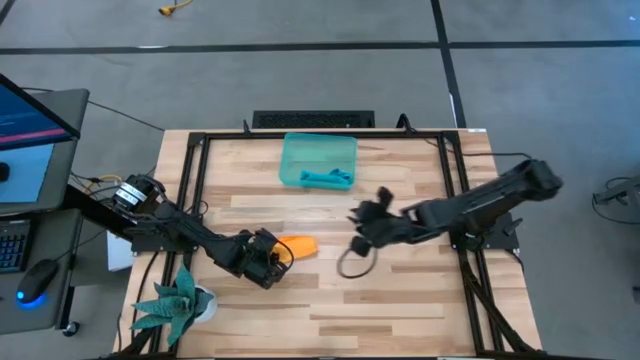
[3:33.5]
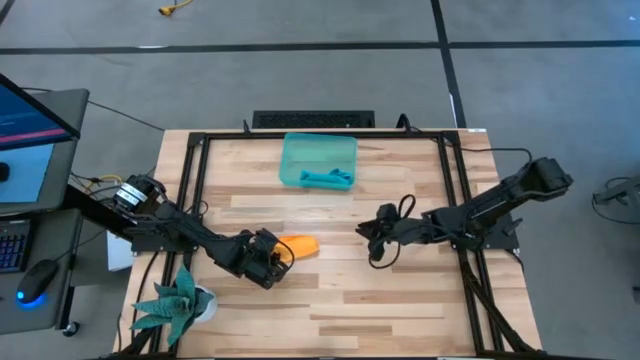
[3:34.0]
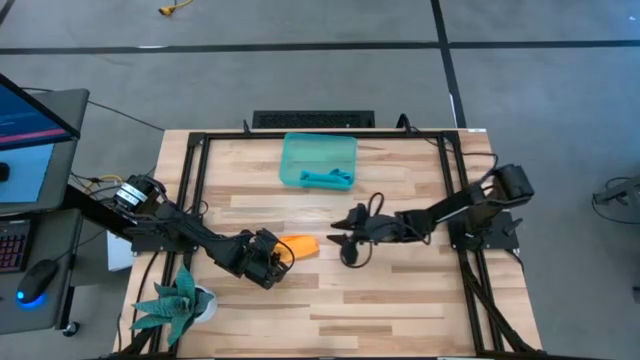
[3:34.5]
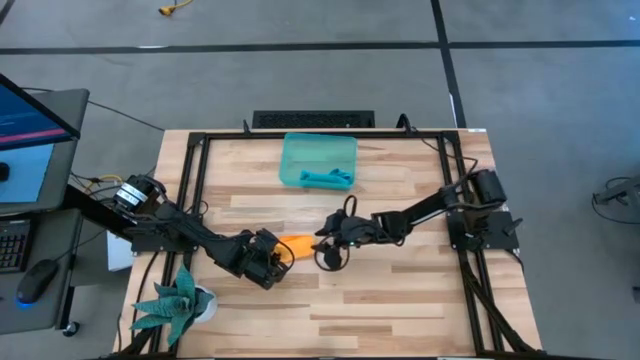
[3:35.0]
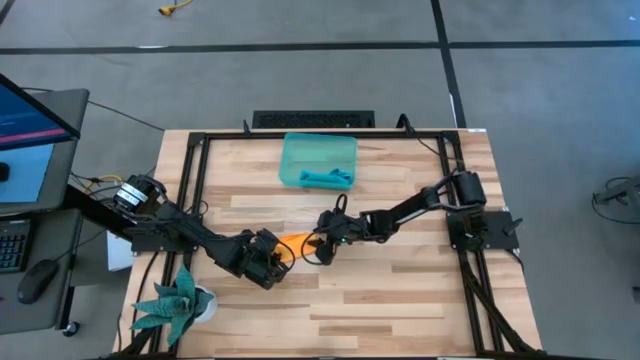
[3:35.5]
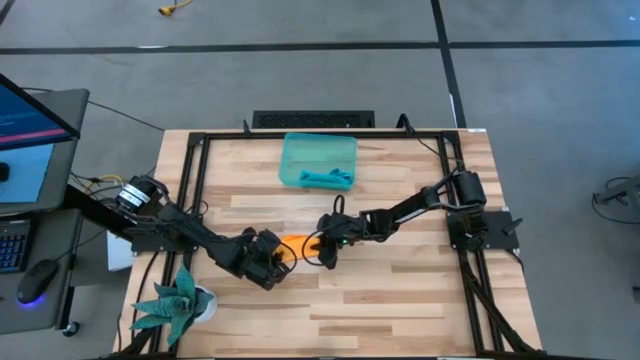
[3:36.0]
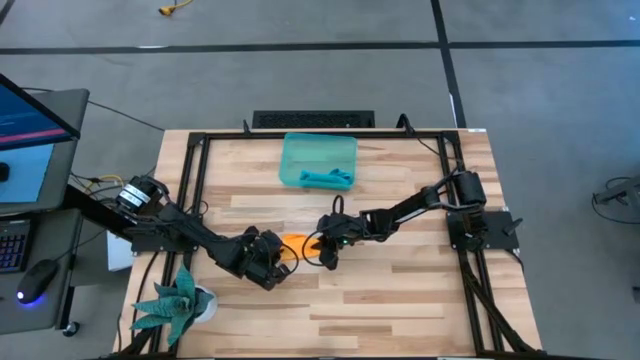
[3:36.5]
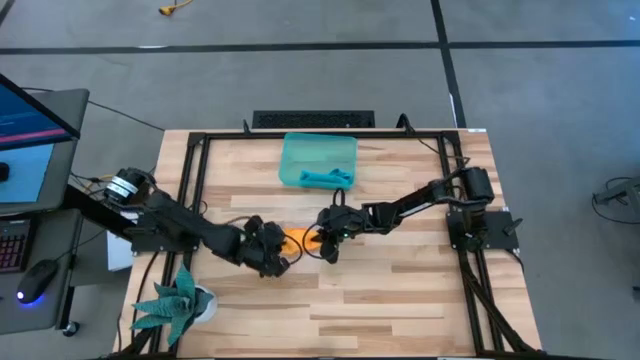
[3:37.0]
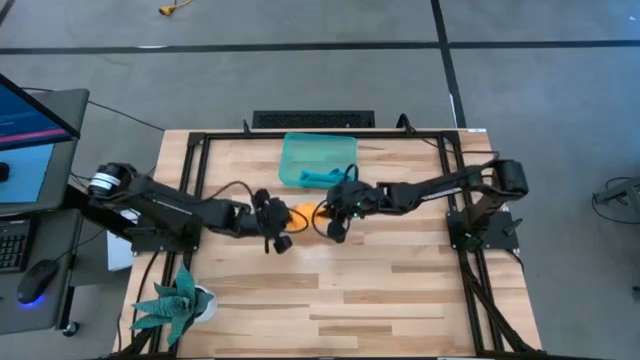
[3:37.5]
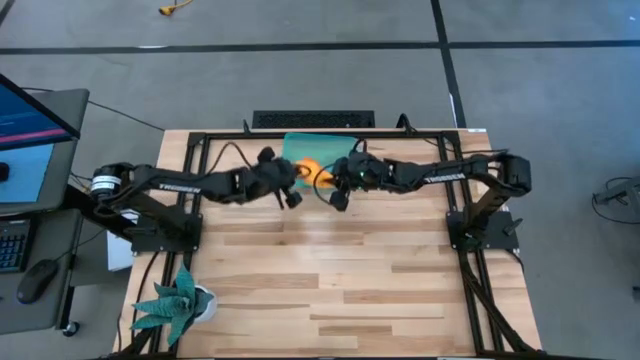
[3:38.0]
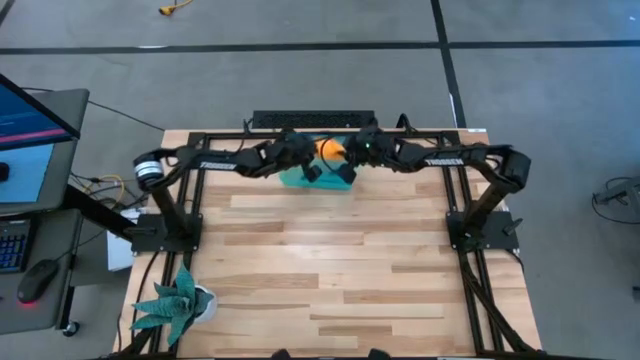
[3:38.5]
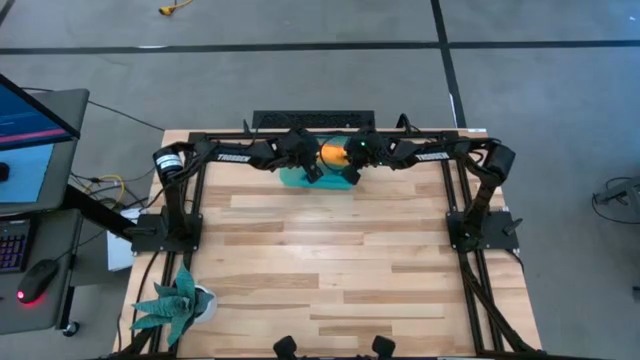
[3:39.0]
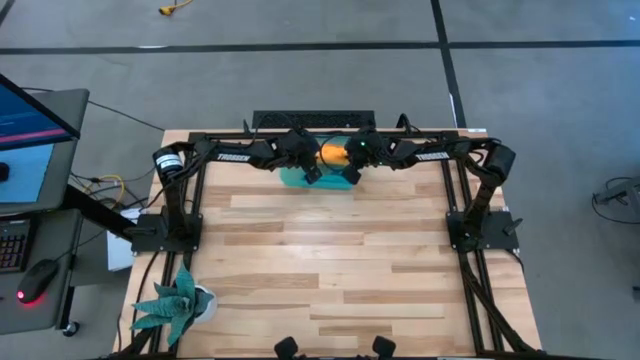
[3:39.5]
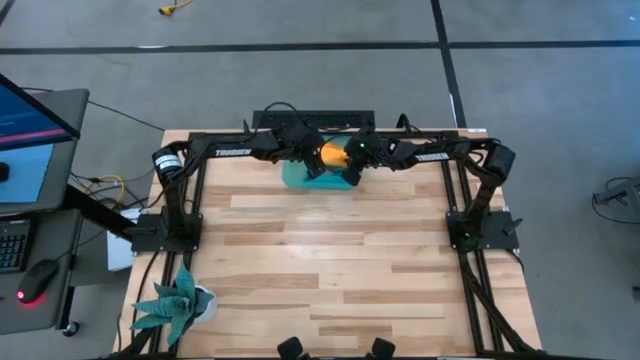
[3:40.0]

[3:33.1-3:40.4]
Task: Roll microfiber towels into tight, uniform cylinder then place into a basket
Put the yellow microfiber cloth into the blue bin

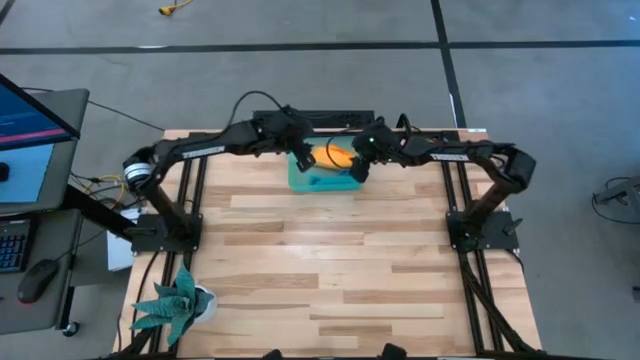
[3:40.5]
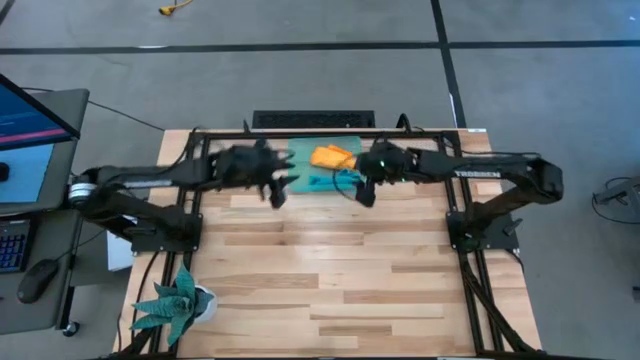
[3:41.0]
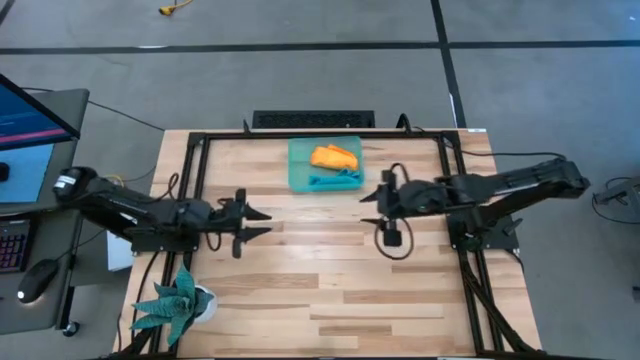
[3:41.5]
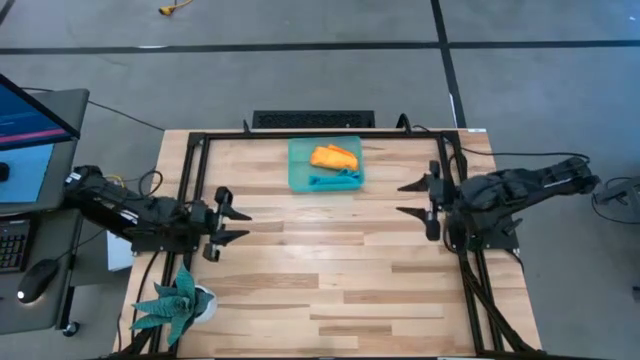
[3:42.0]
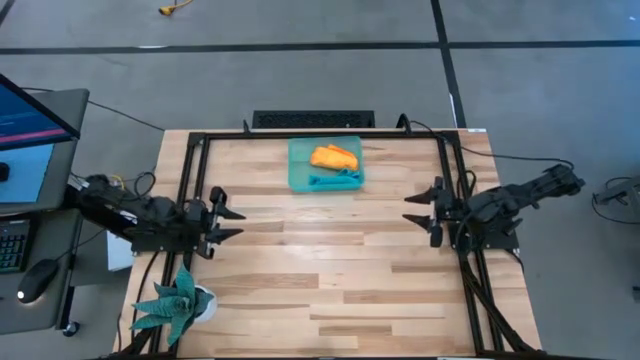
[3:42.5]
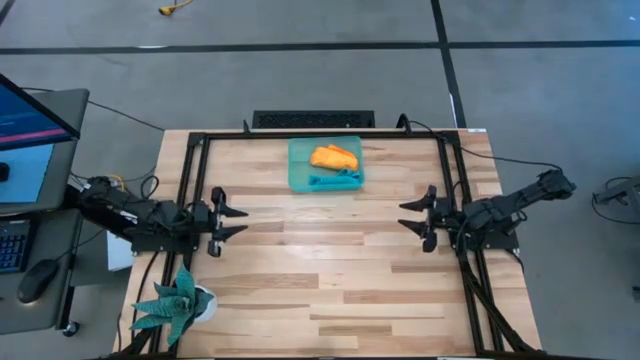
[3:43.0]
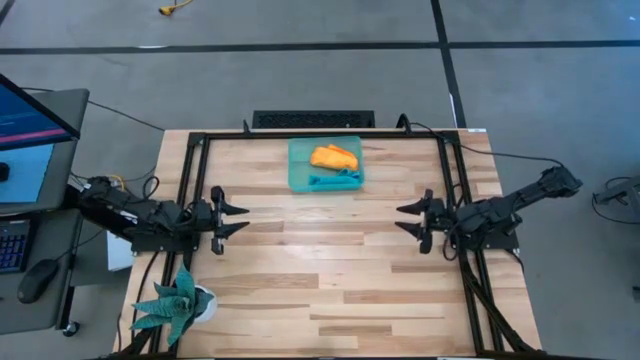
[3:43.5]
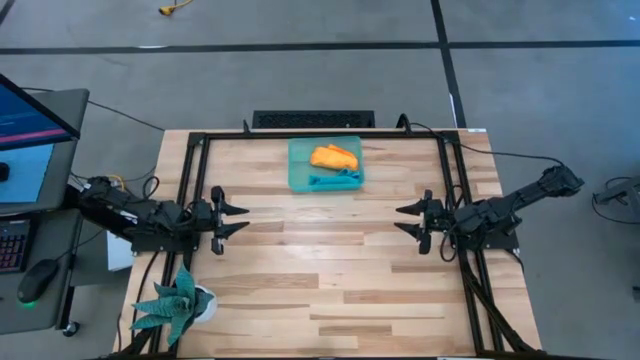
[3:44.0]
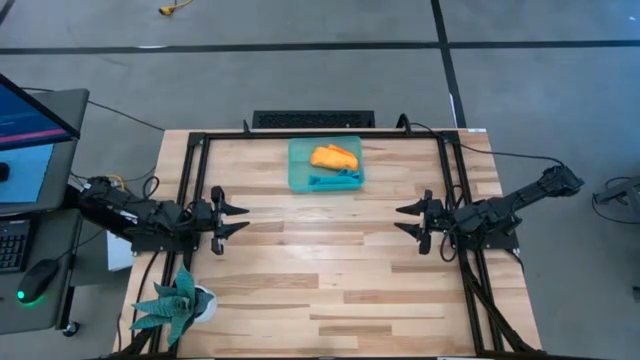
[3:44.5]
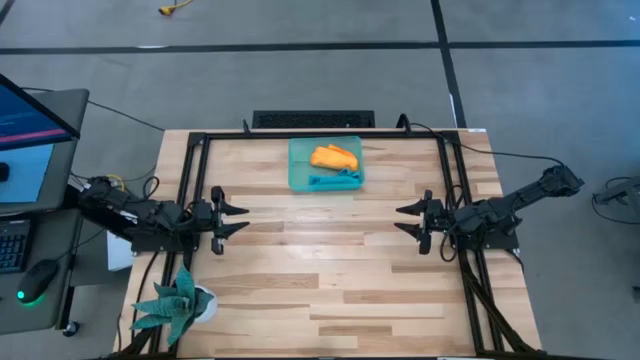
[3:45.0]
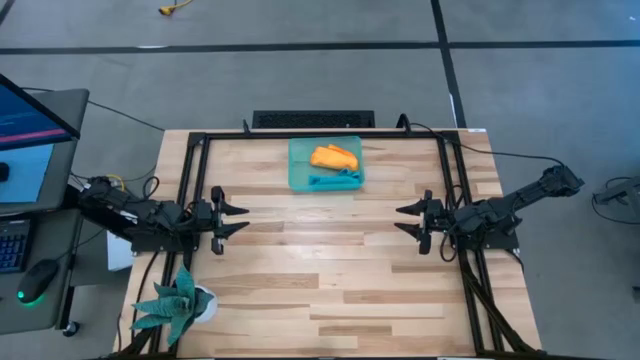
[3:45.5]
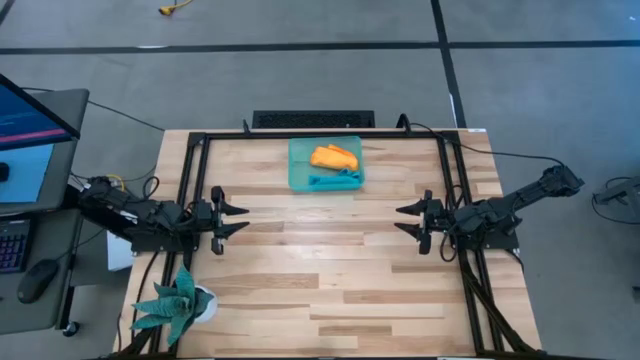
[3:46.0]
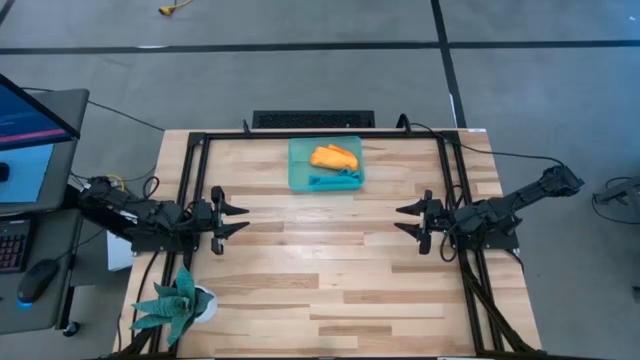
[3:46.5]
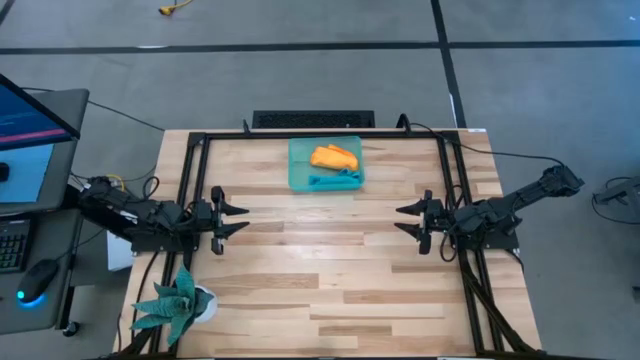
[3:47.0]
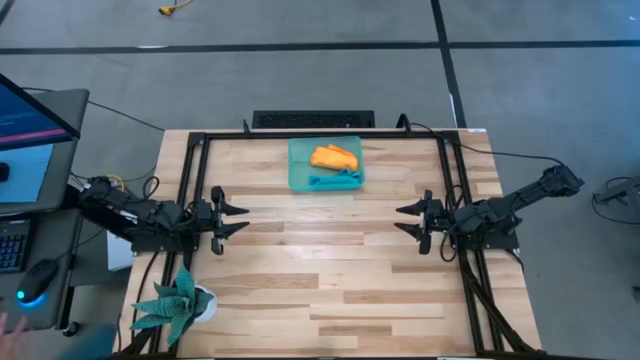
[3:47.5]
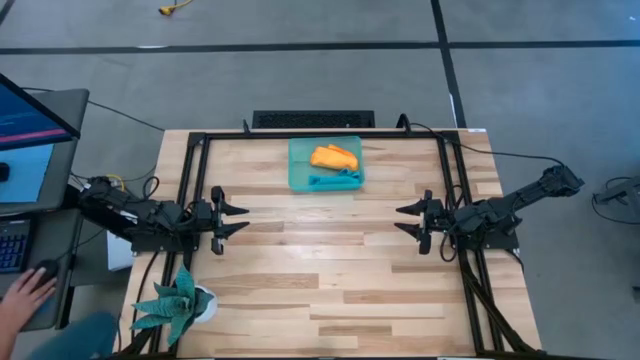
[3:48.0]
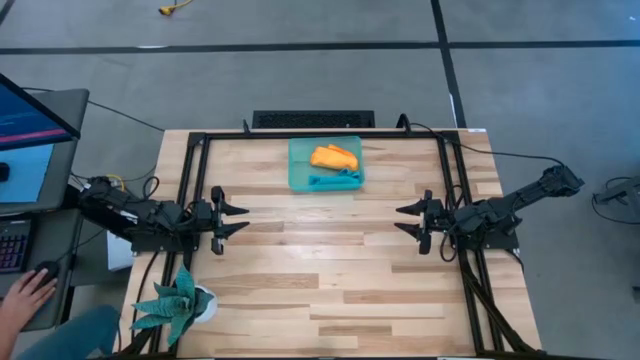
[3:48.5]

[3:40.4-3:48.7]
Return to Home Position

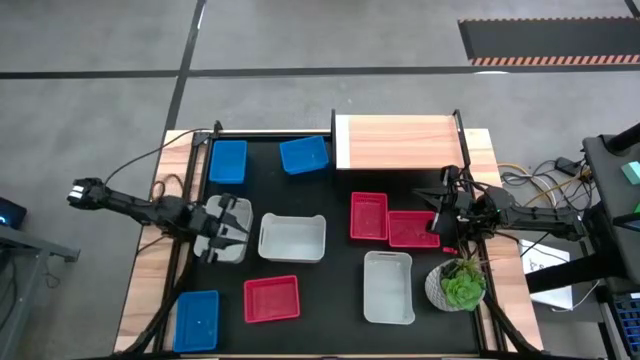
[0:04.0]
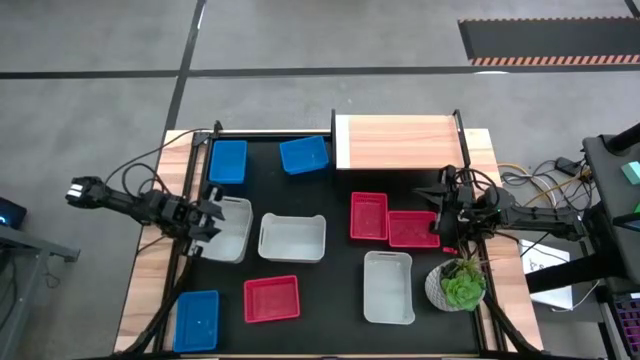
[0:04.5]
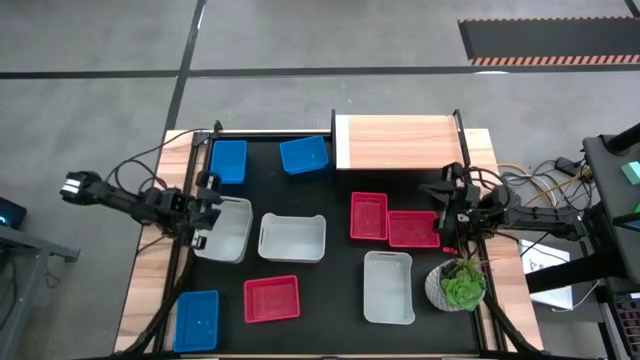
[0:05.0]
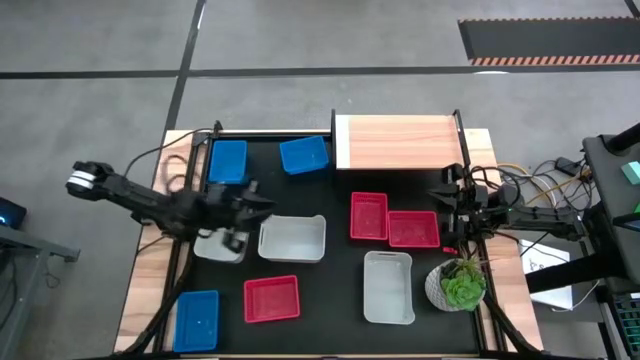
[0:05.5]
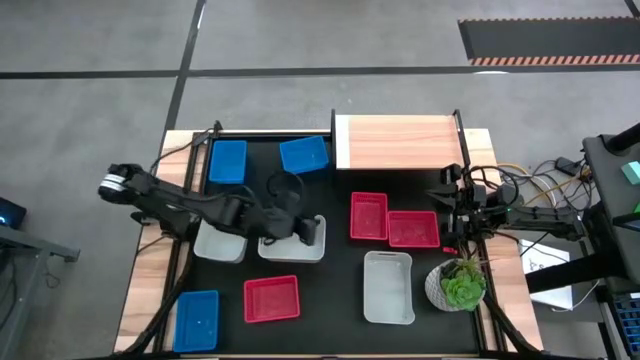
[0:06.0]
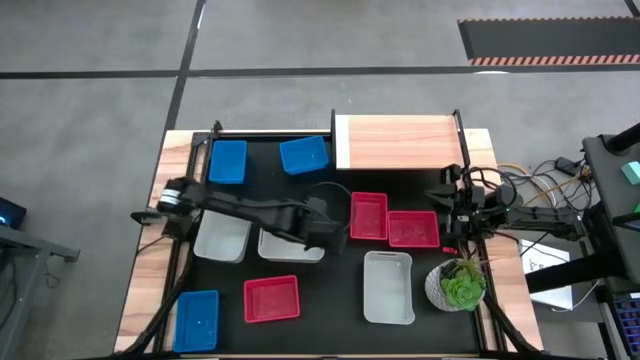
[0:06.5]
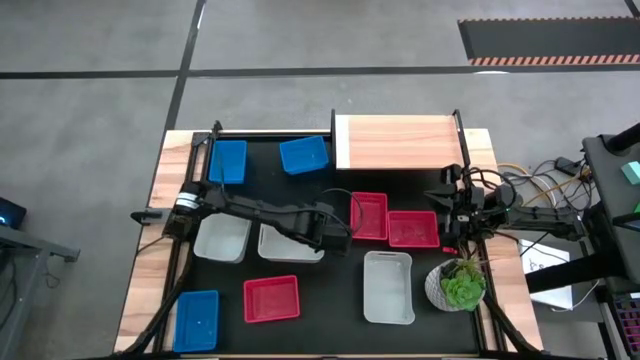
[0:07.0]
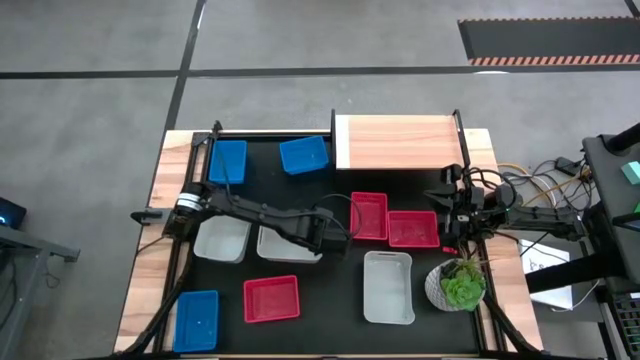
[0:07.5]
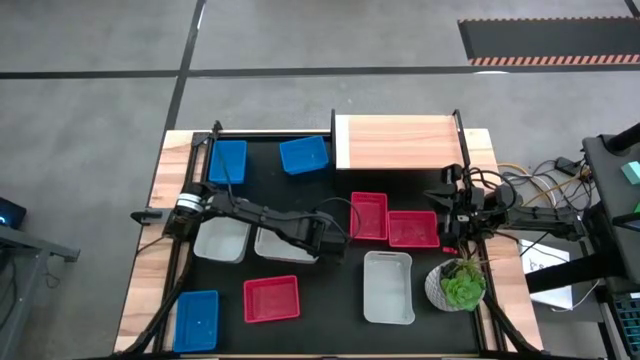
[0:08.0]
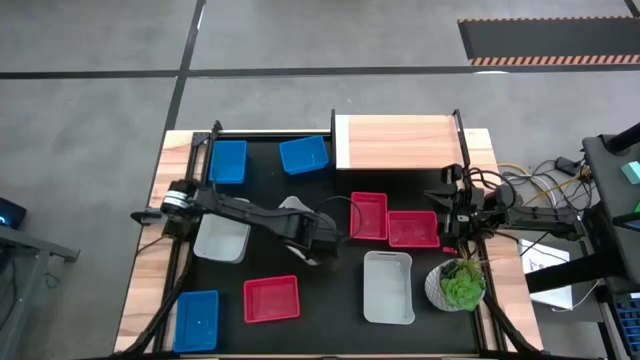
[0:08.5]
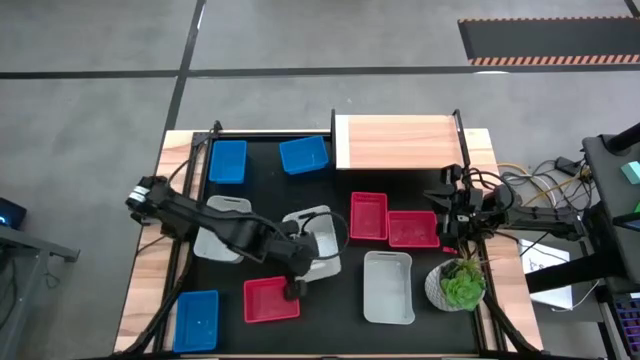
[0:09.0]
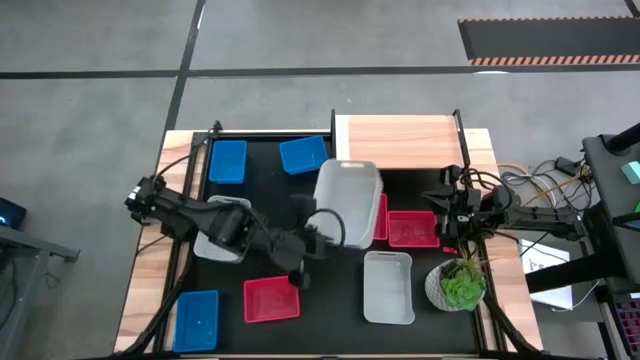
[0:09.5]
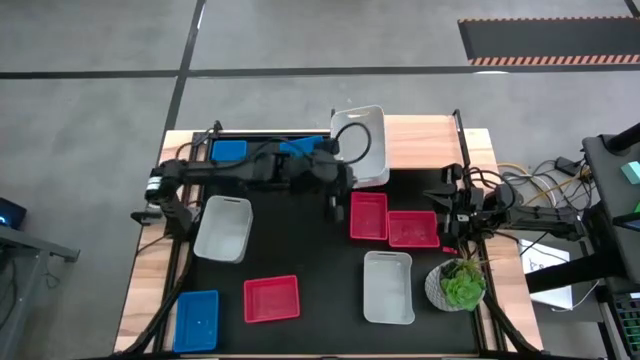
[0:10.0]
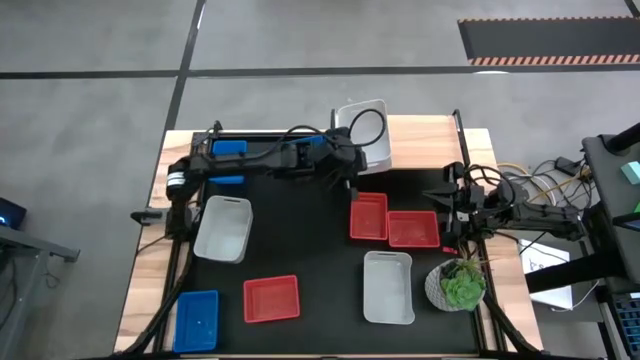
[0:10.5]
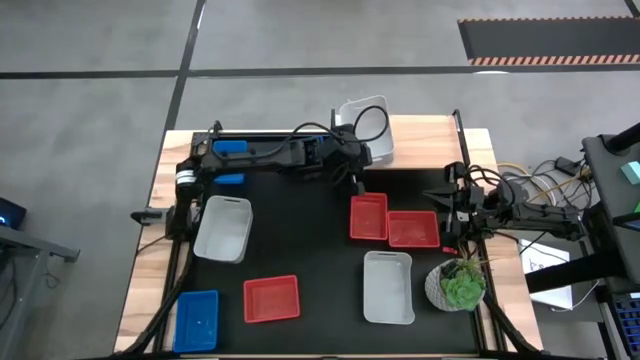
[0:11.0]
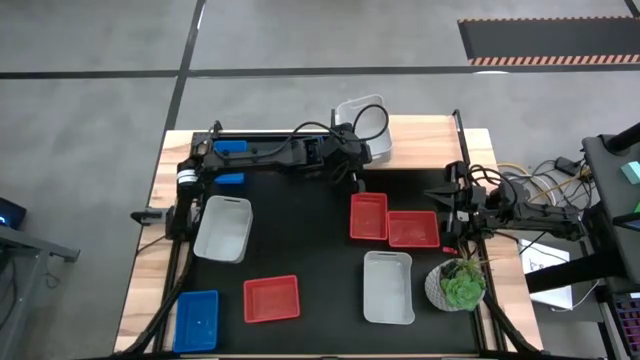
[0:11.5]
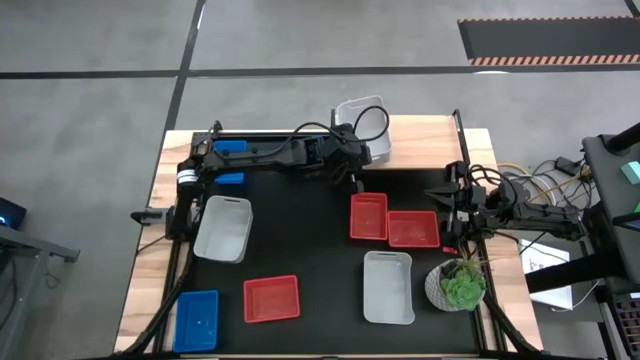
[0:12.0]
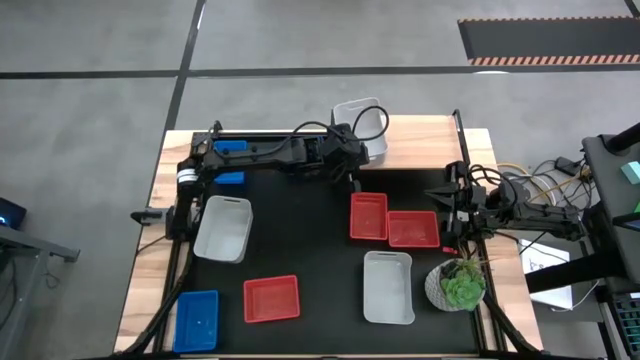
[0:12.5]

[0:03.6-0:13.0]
Task: Stack baskets on shelf by color
Put the top right gray bin on the shelf
